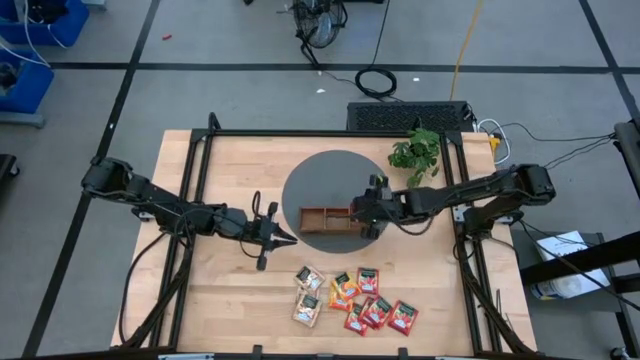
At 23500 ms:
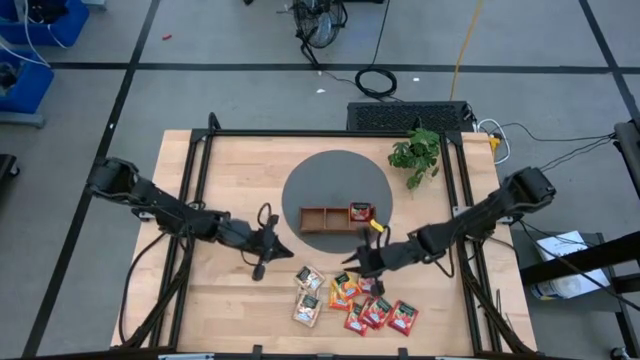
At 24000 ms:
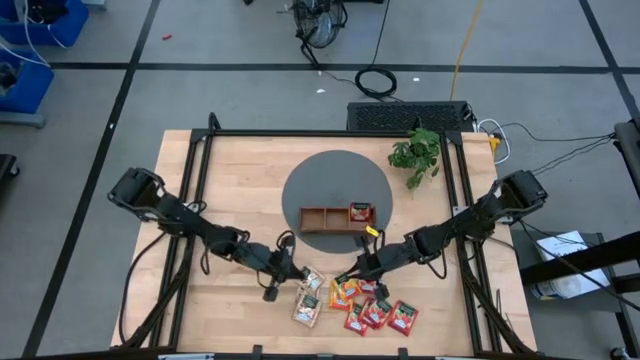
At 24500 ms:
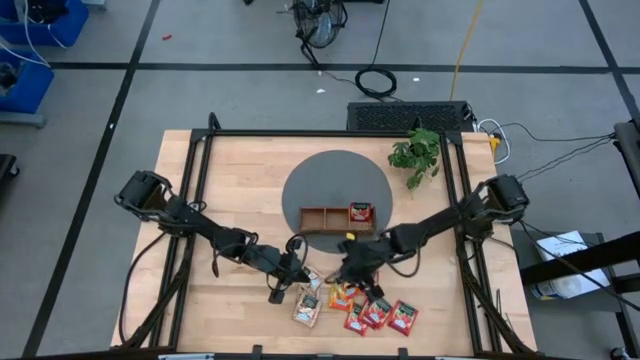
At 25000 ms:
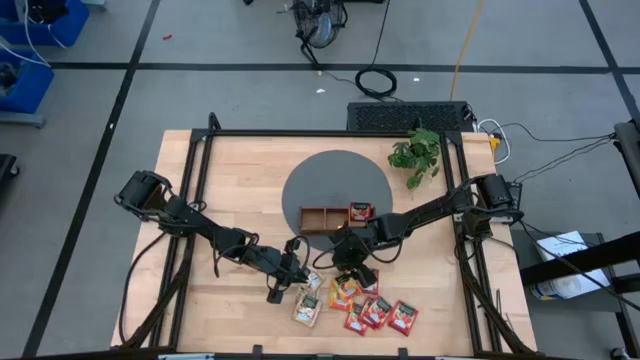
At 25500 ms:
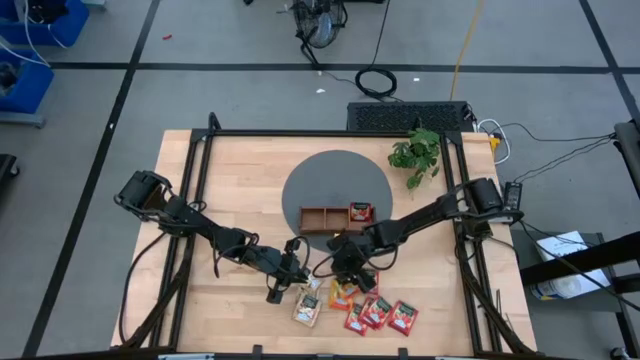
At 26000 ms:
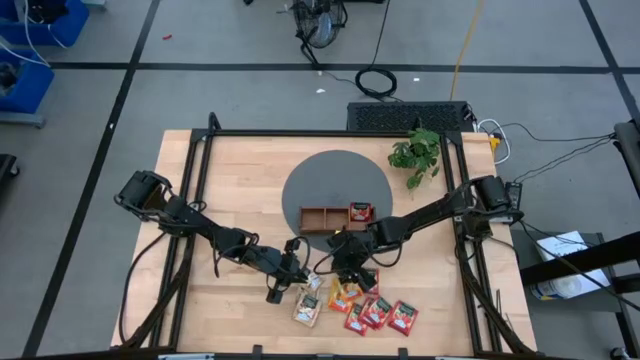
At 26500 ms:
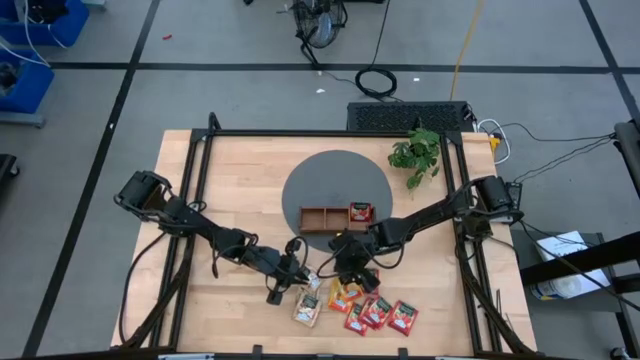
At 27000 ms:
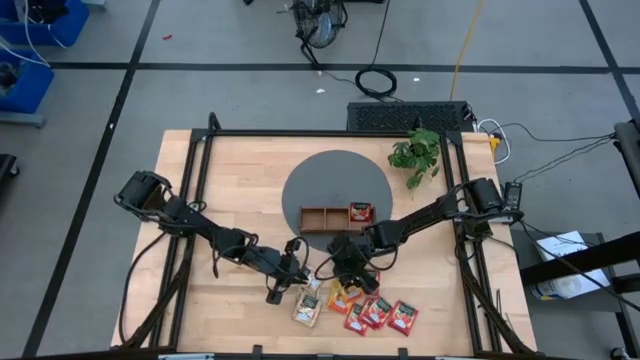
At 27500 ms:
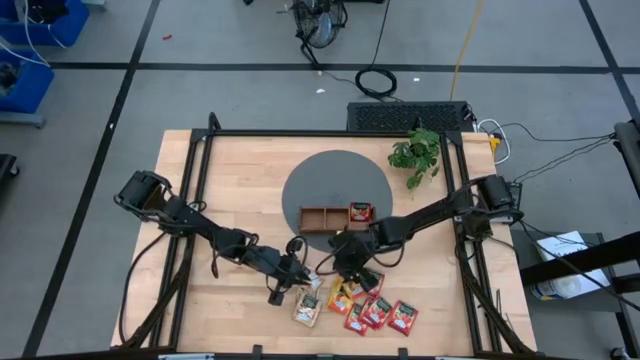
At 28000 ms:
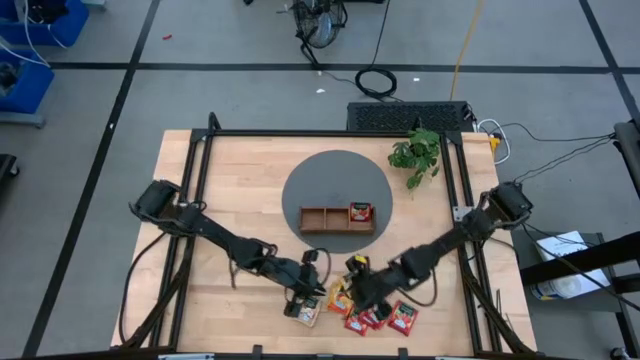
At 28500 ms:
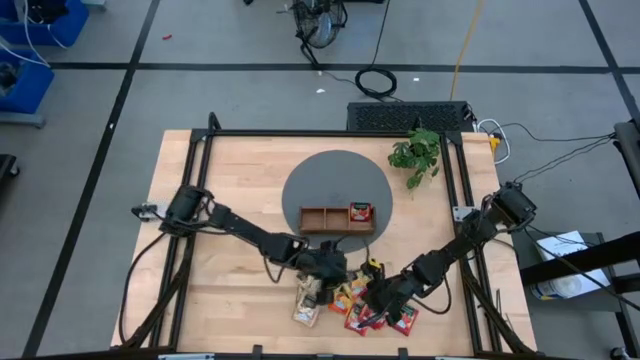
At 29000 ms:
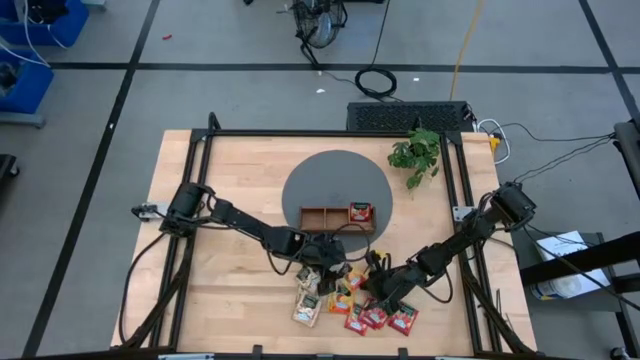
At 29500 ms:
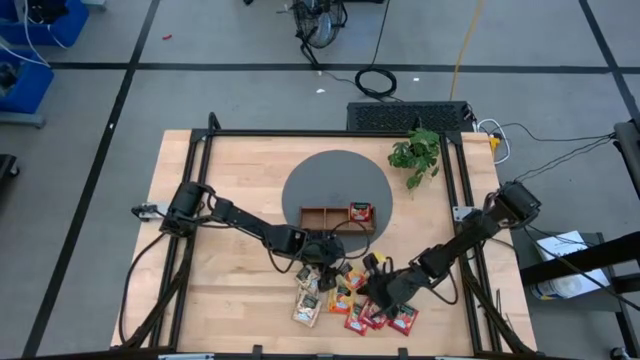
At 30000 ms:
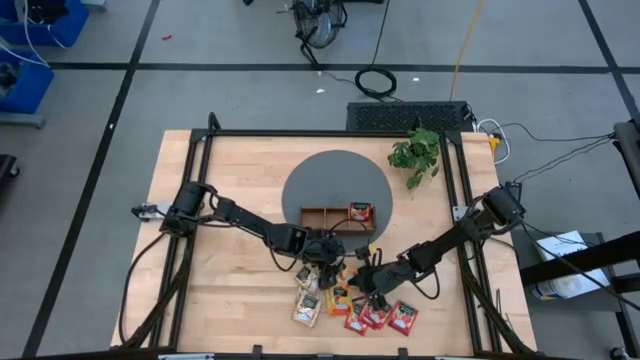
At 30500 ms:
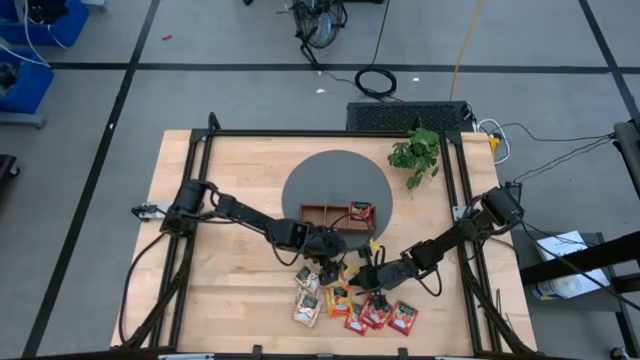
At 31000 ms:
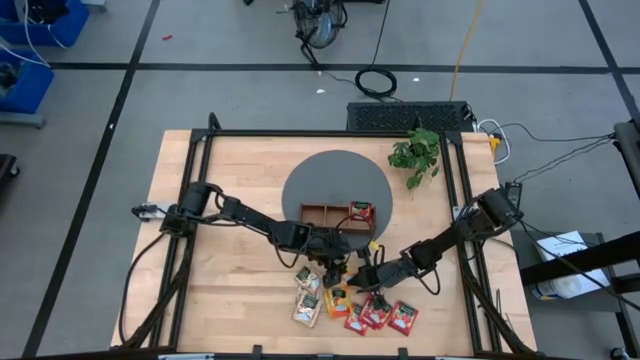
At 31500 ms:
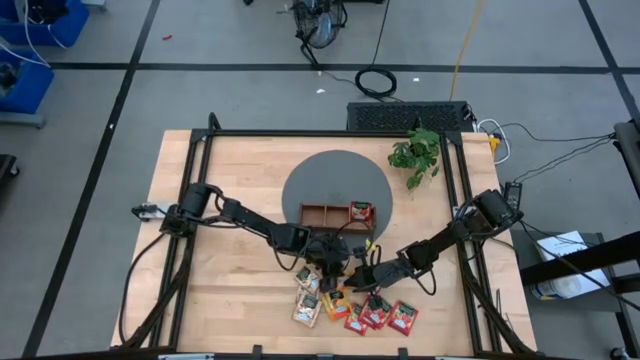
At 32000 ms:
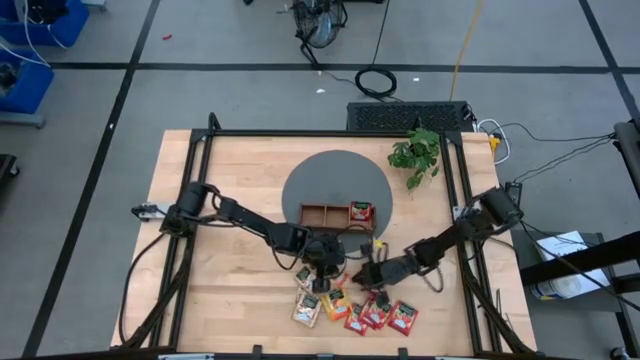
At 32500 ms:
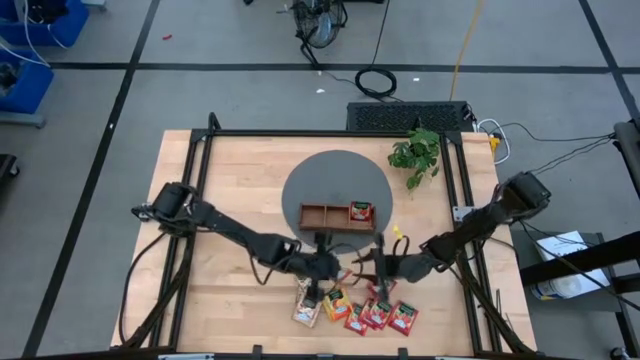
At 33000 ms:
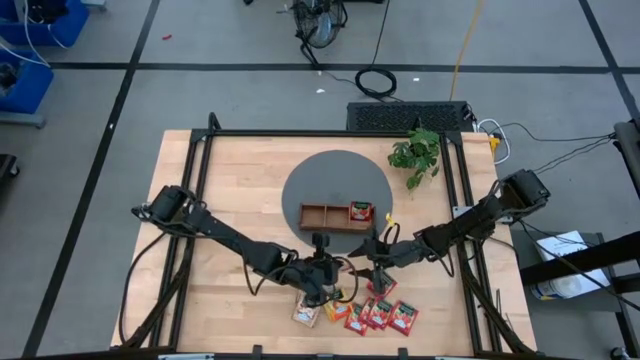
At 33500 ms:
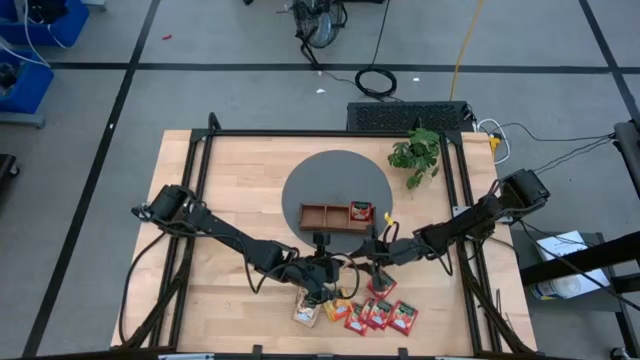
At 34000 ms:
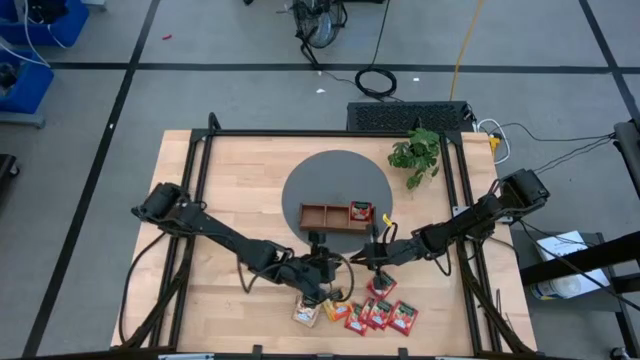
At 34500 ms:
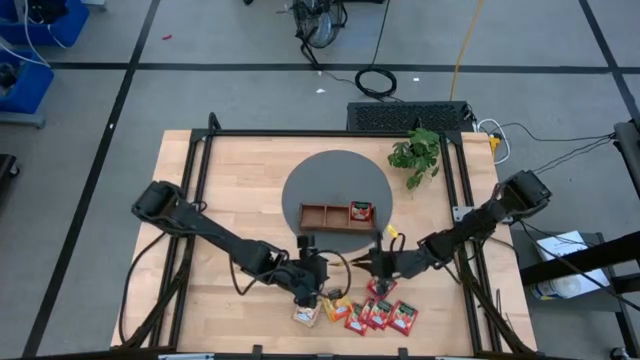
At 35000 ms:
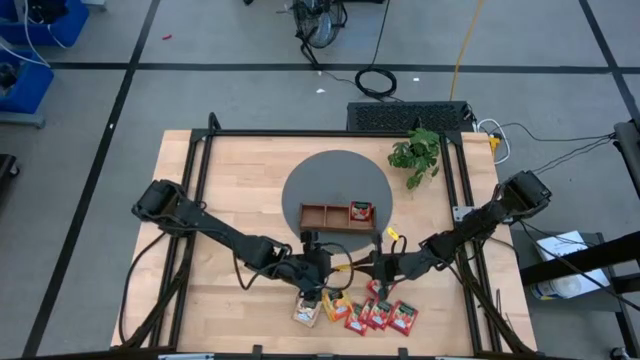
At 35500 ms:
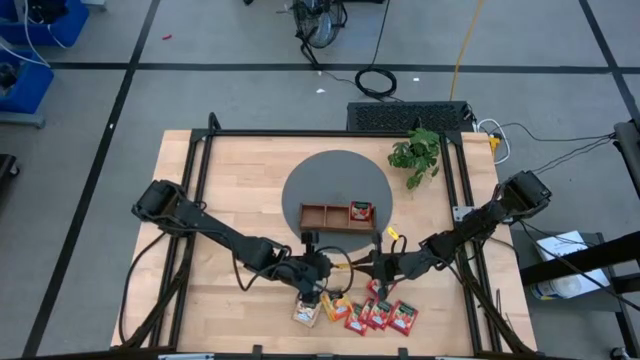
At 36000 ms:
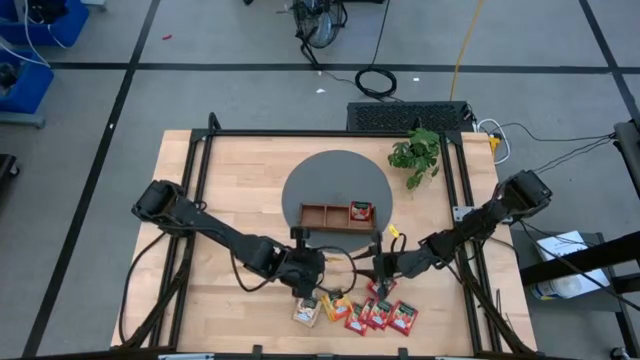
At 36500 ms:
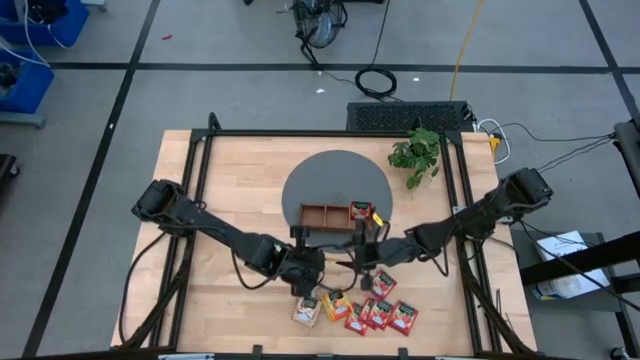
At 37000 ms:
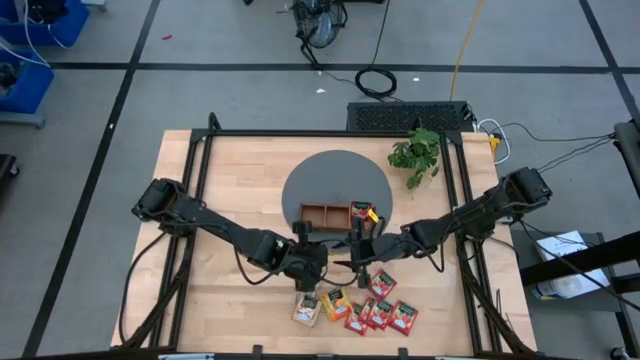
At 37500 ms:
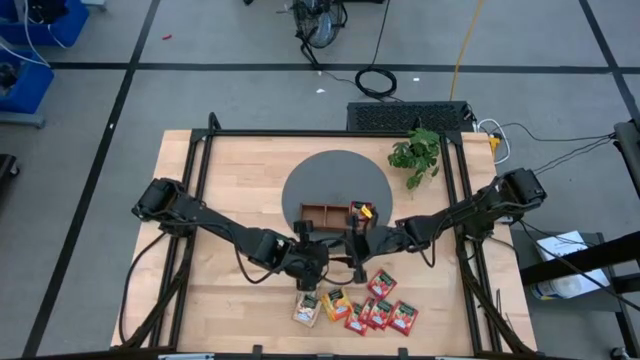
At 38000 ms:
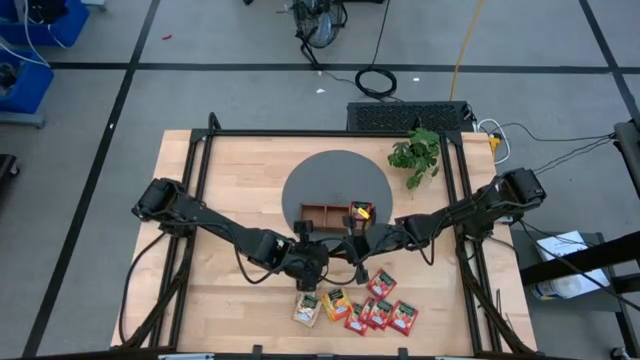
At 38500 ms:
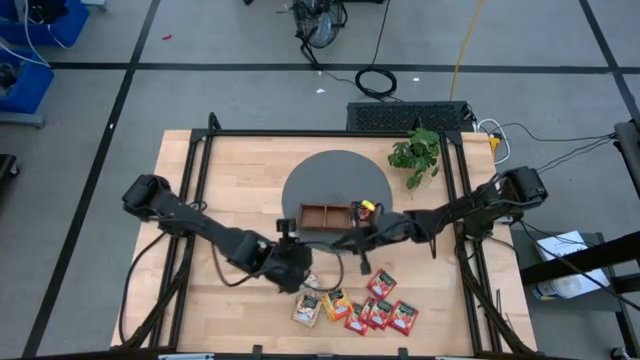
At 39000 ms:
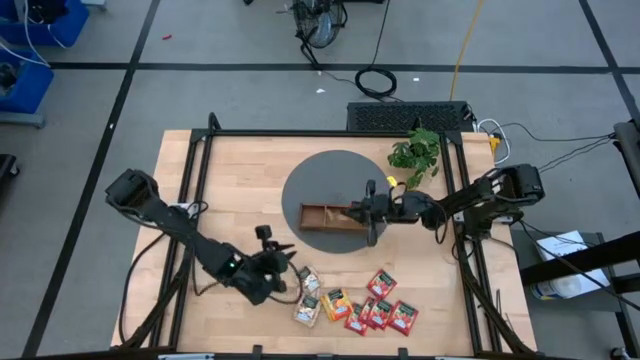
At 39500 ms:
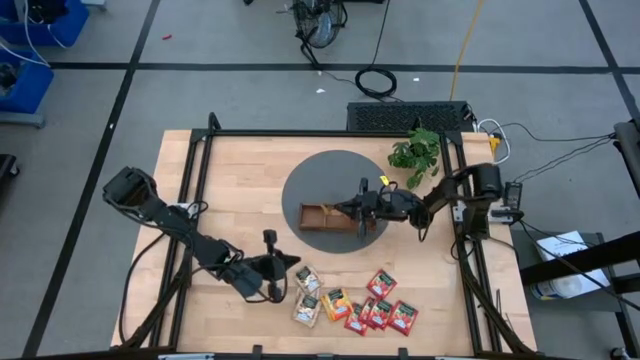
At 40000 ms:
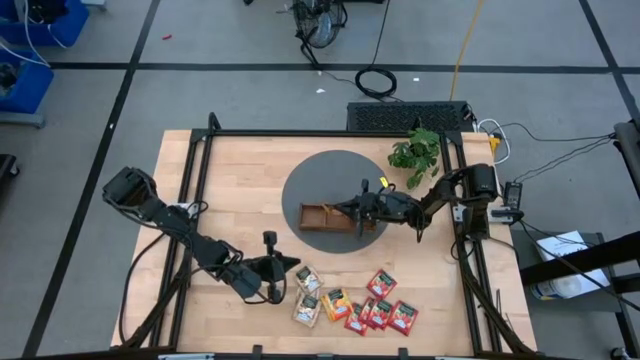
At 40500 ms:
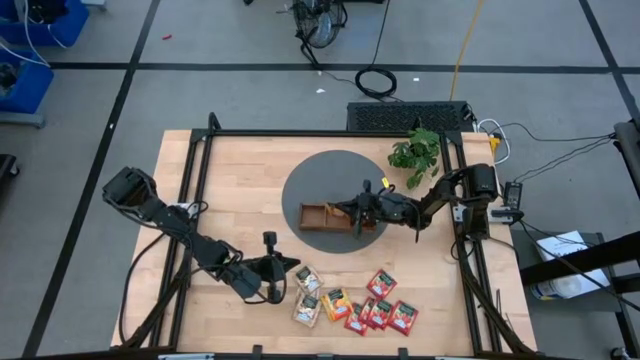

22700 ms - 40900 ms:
Task: Pick & Place Tea
Put the orange tea bag into the middle slot of the wooden organizer

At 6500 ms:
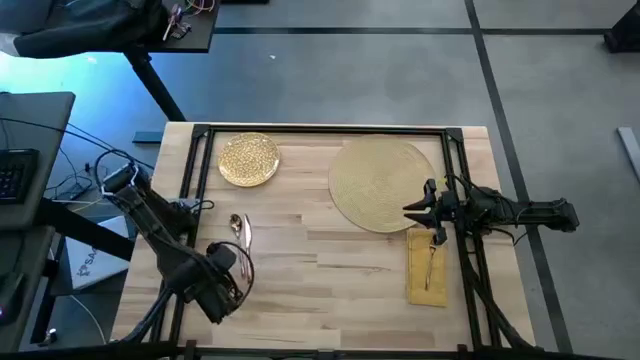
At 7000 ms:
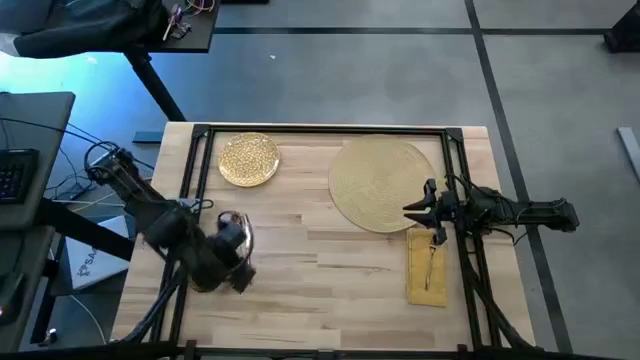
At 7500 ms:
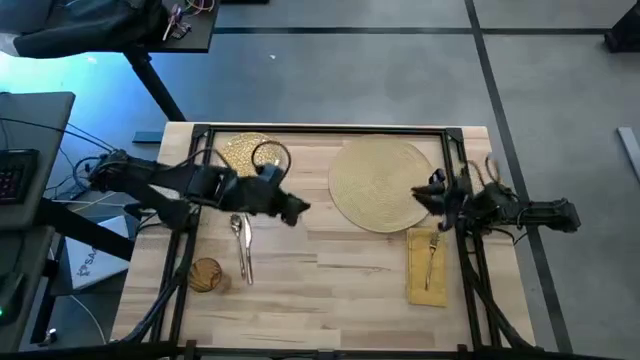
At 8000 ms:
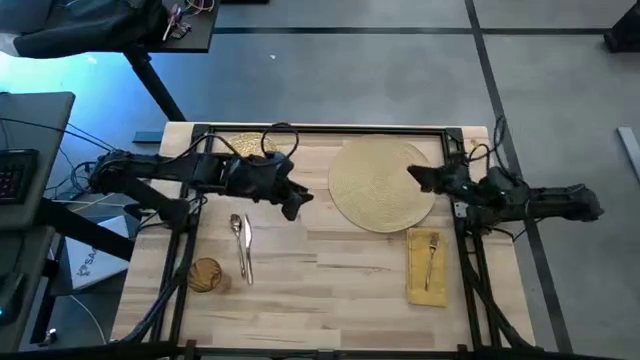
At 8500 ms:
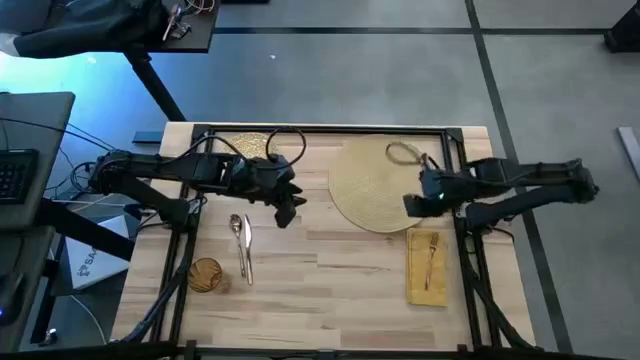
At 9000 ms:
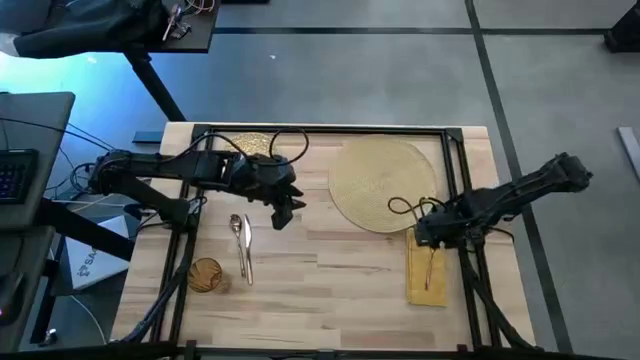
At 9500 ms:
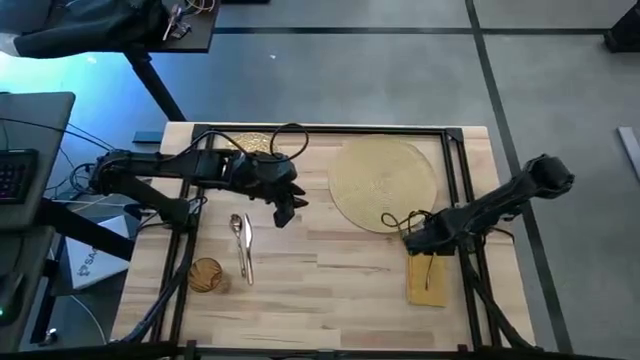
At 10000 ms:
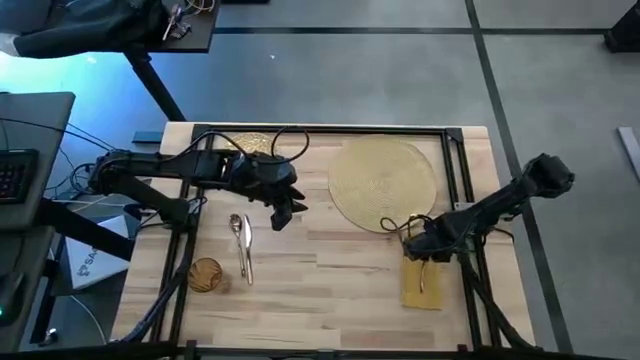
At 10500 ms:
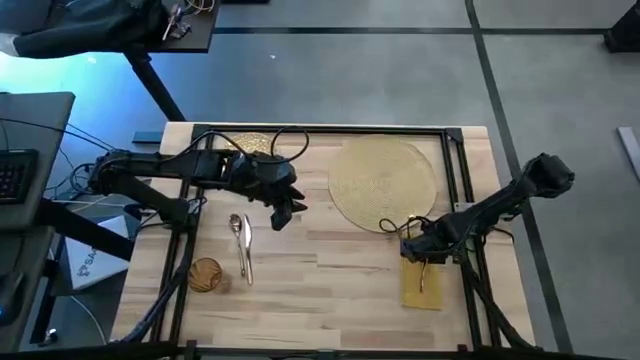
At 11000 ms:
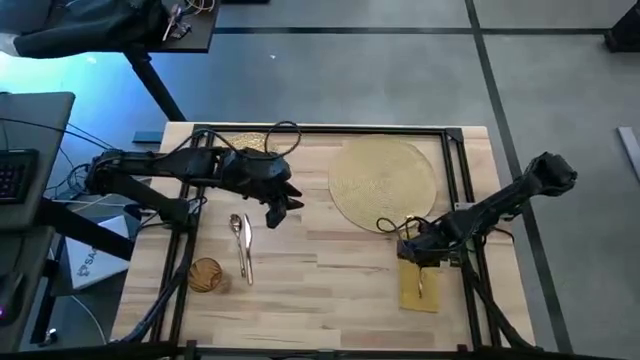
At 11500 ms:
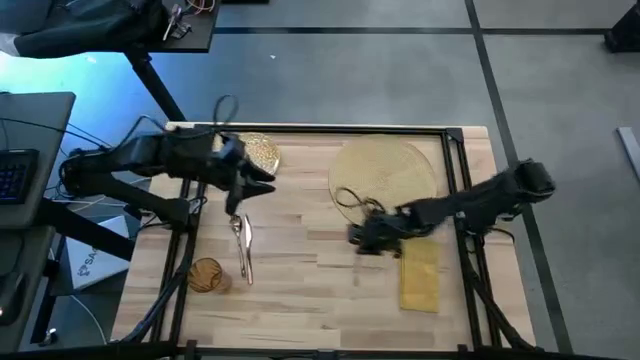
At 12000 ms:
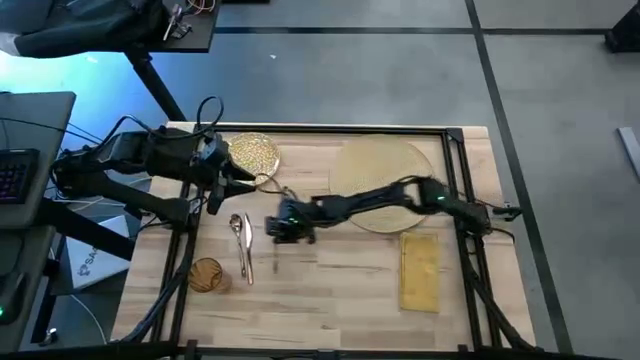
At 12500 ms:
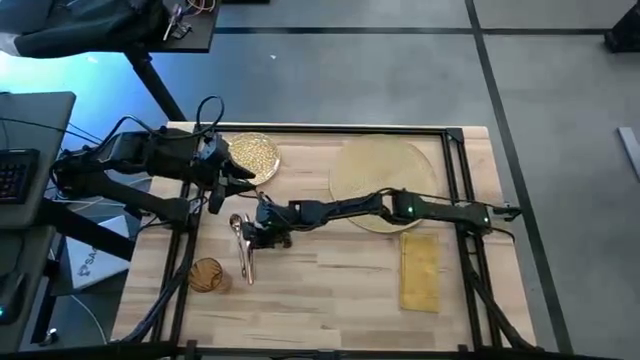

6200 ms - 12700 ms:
Task: Set table place
Move the brown fork to the right of the brown table knife
